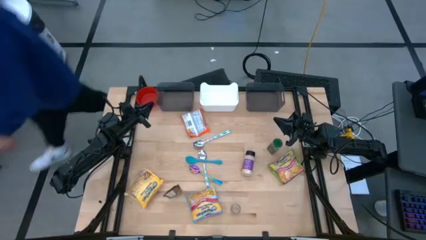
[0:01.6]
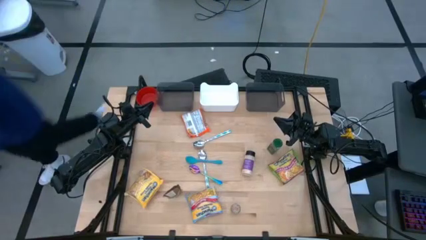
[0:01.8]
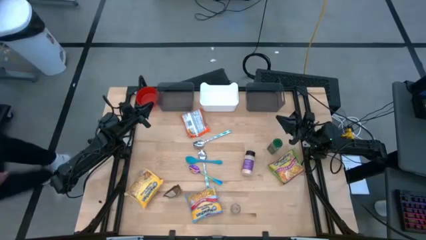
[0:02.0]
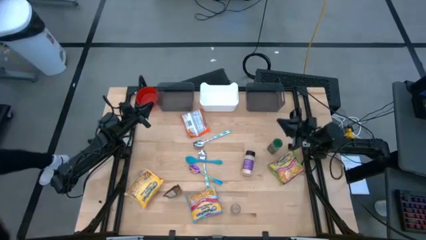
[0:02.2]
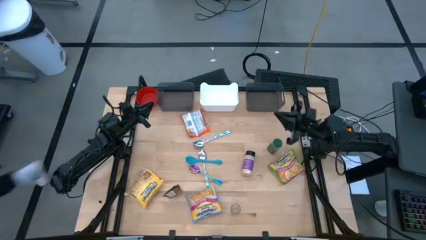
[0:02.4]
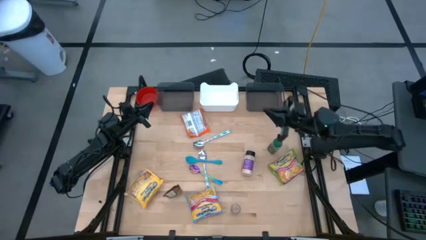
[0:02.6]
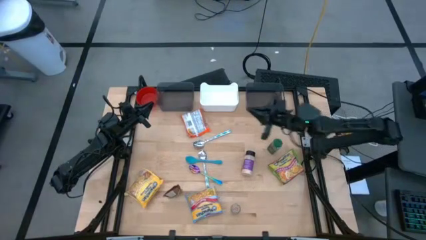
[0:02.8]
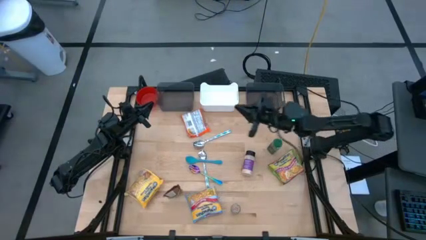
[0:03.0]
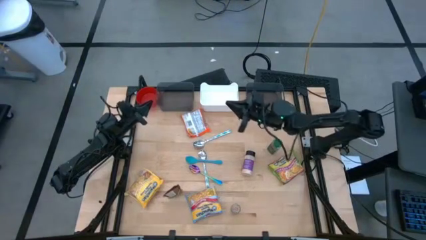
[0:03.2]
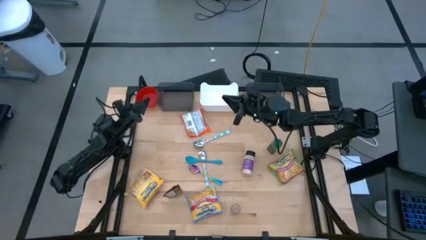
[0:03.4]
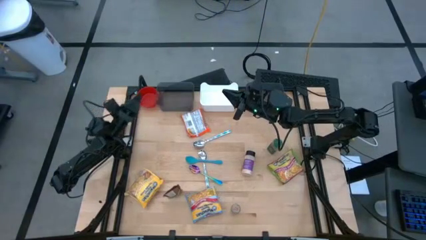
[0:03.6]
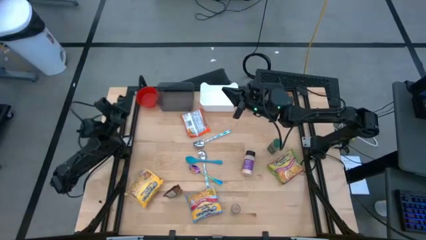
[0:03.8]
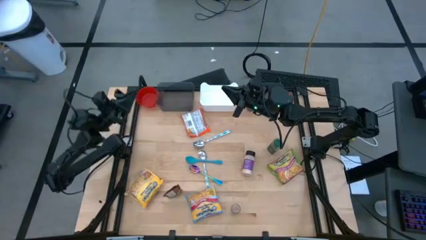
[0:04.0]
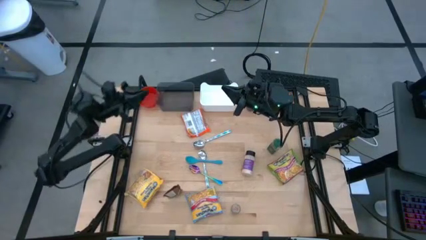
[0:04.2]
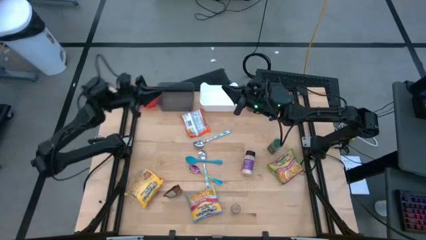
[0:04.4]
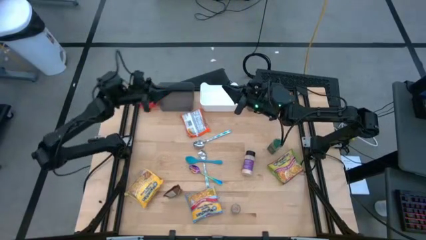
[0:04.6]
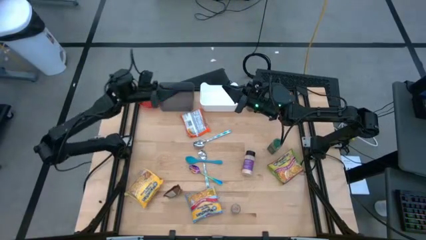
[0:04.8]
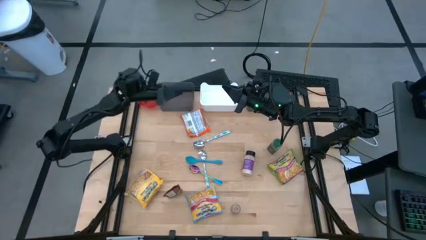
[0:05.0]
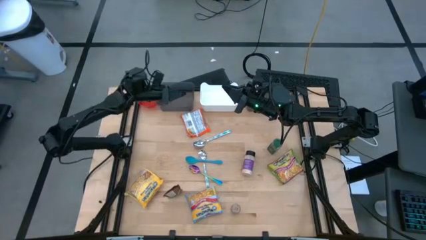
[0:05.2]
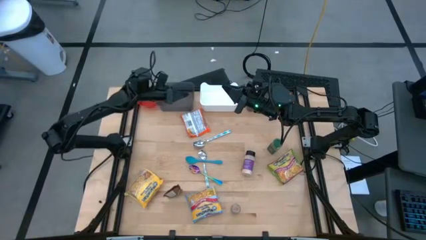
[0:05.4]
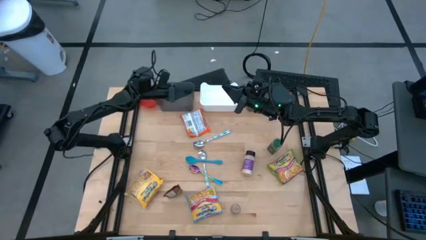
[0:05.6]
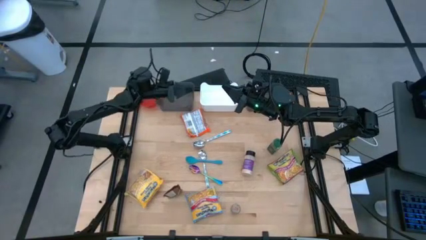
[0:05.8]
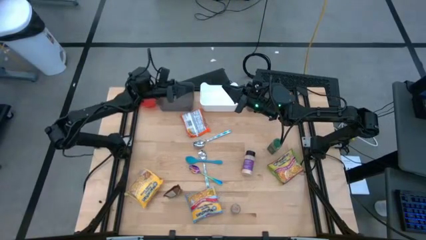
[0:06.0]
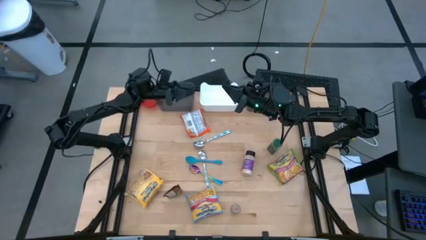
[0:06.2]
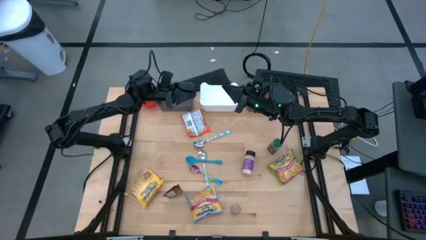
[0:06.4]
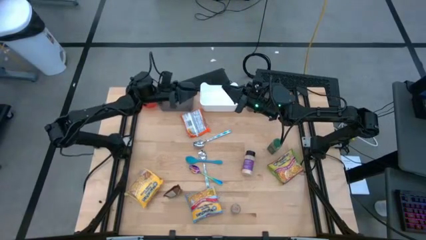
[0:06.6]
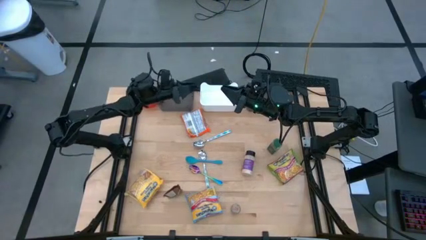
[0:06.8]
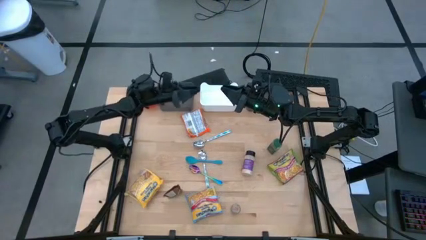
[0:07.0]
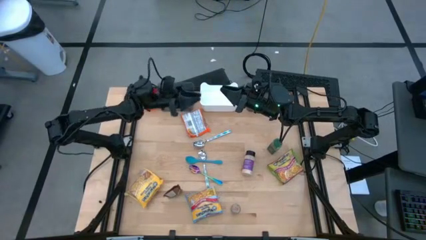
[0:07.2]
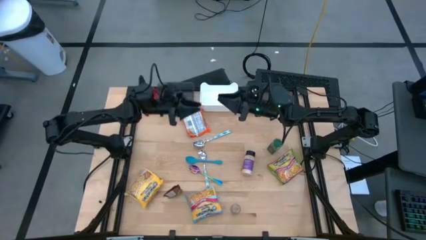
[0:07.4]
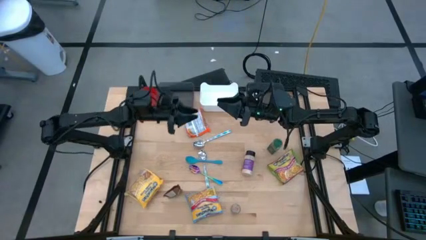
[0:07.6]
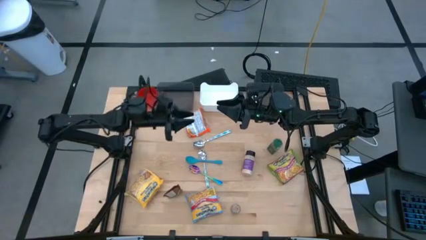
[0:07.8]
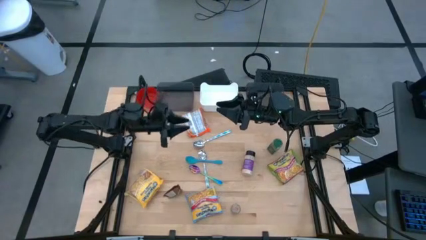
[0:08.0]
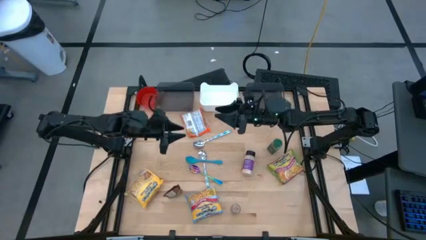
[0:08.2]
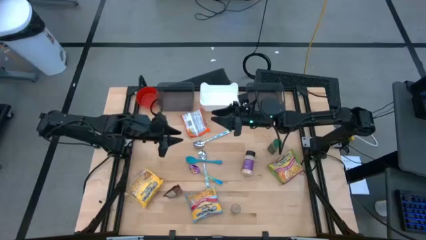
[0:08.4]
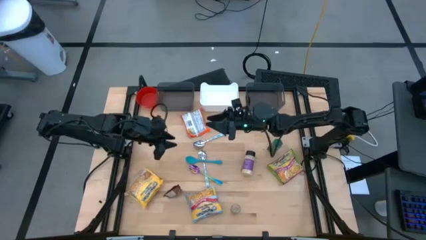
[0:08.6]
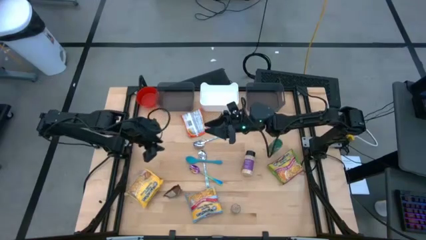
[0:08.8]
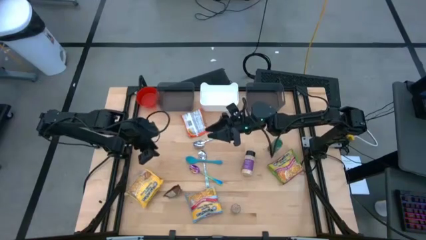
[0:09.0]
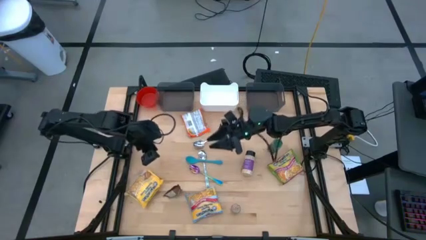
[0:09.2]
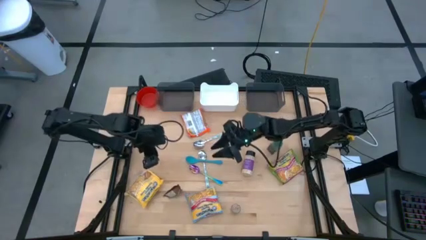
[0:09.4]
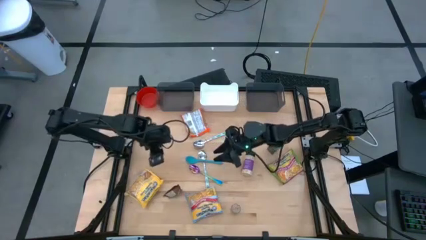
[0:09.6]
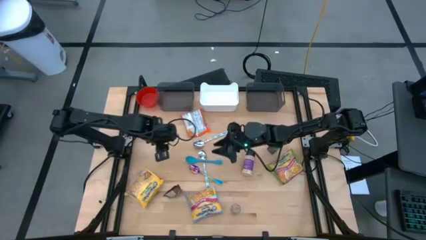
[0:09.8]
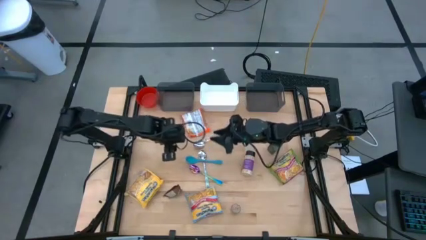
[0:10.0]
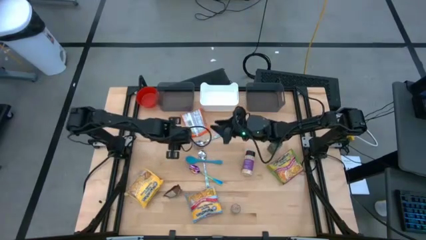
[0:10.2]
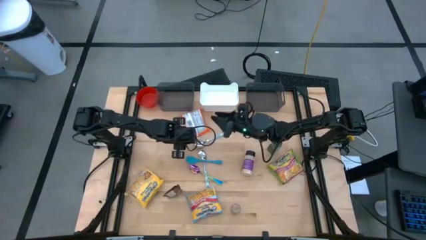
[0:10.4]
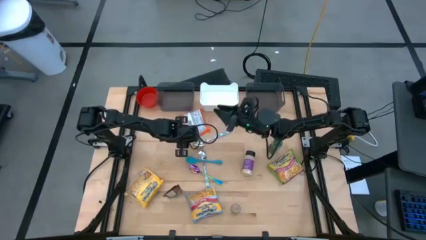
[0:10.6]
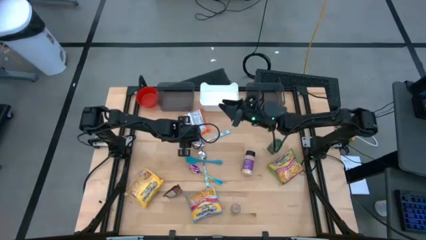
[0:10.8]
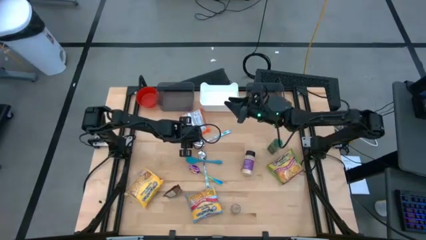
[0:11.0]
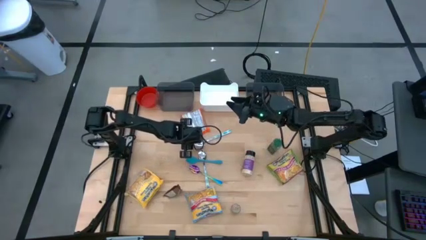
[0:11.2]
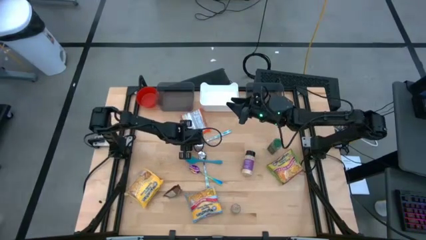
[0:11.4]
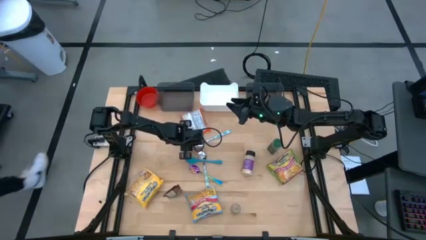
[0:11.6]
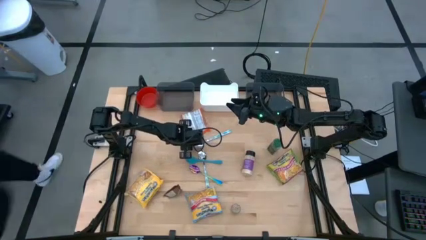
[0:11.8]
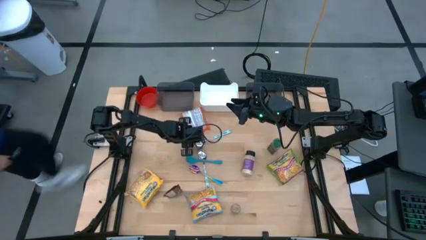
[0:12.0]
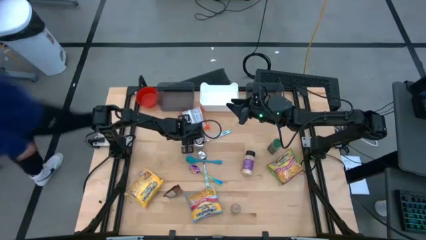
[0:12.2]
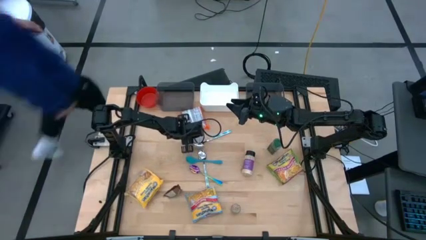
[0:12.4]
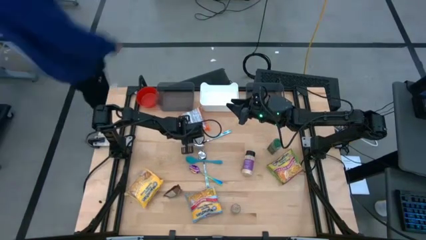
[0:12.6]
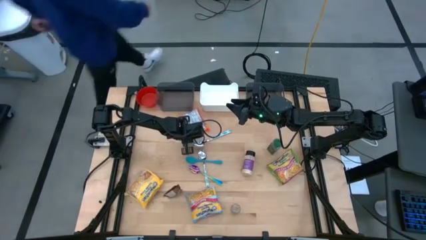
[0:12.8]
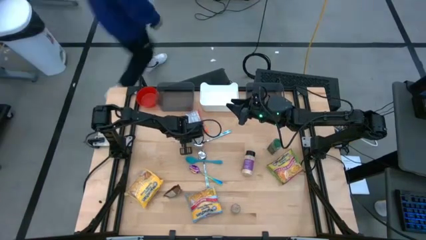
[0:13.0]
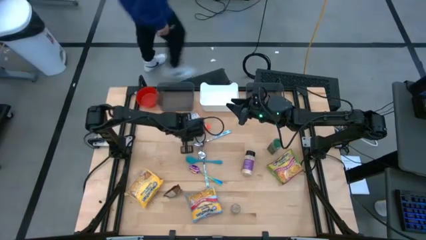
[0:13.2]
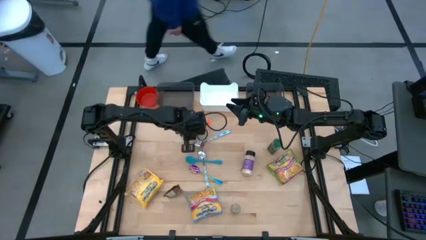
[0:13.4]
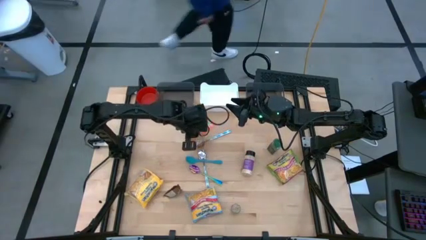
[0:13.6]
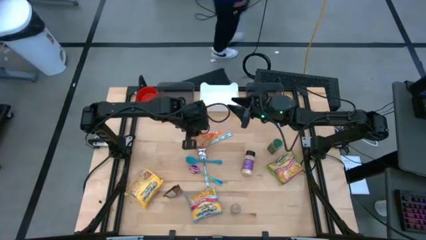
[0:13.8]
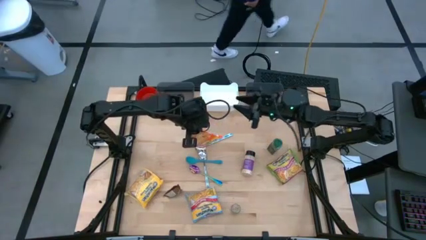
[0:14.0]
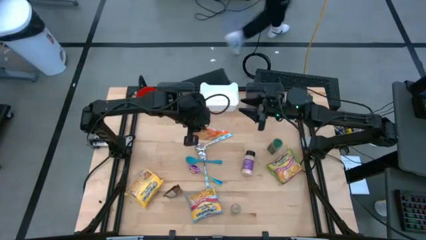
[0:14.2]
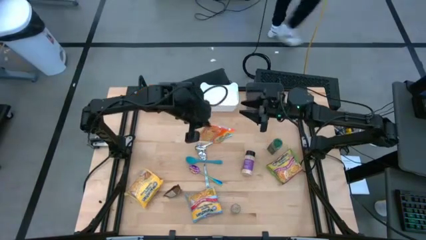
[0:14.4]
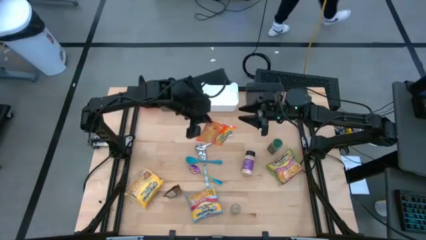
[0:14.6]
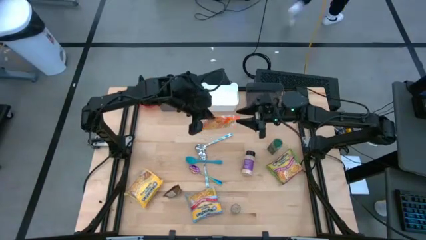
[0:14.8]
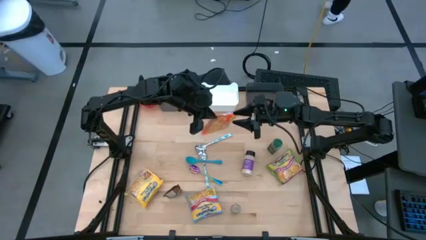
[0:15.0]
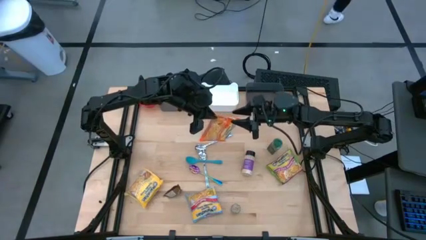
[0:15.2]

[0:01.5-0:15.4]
Task: Pick & Place Food Item
Put the orange noodle pack into the left black bin
